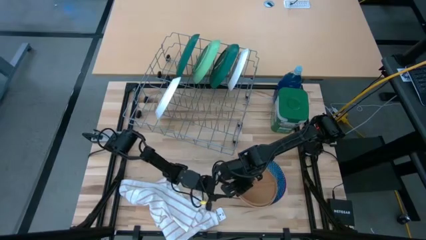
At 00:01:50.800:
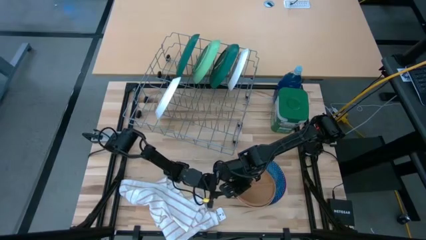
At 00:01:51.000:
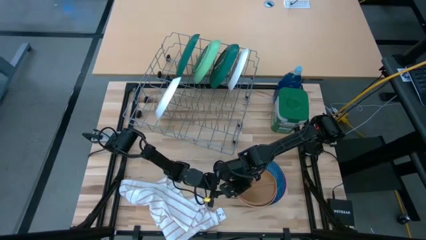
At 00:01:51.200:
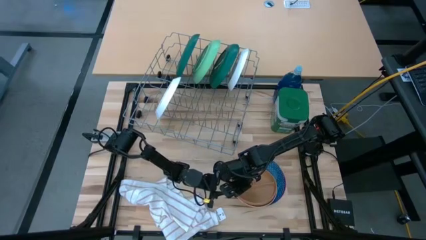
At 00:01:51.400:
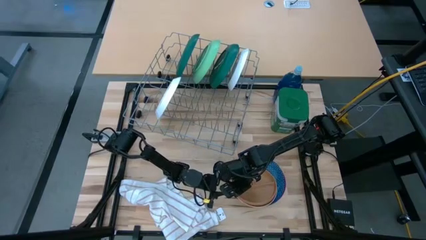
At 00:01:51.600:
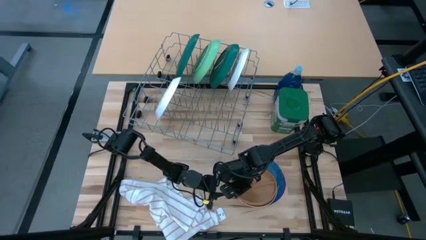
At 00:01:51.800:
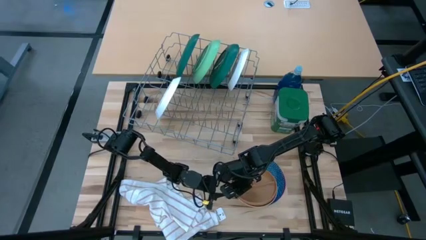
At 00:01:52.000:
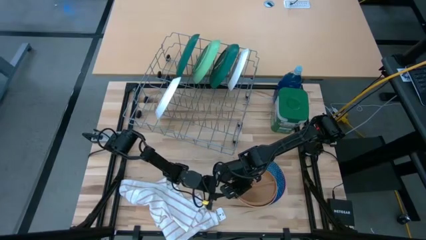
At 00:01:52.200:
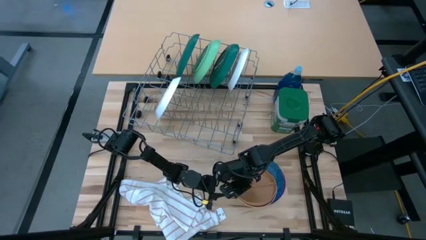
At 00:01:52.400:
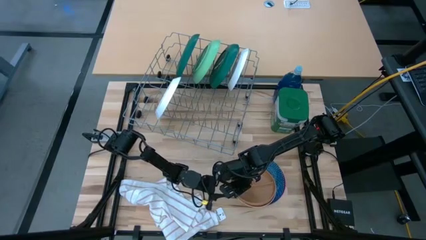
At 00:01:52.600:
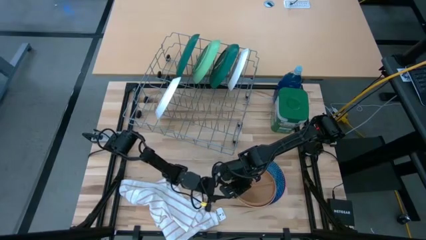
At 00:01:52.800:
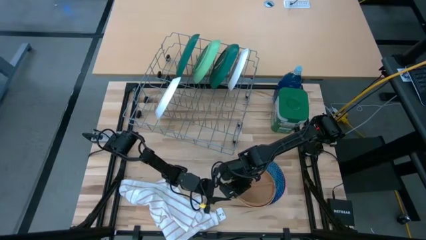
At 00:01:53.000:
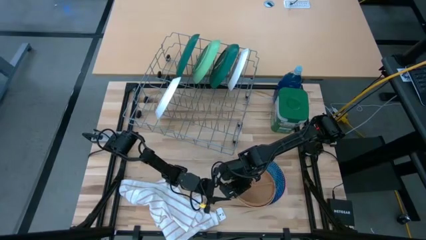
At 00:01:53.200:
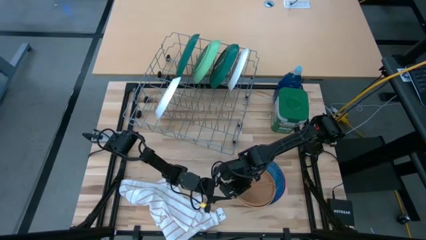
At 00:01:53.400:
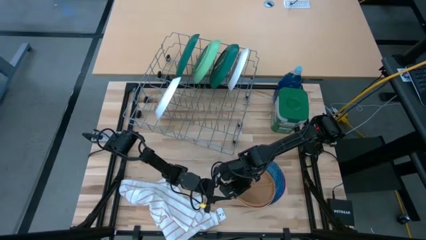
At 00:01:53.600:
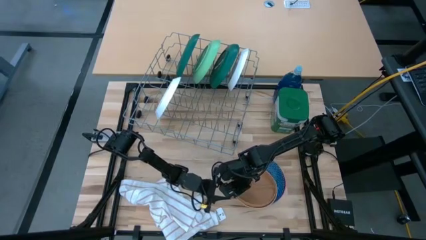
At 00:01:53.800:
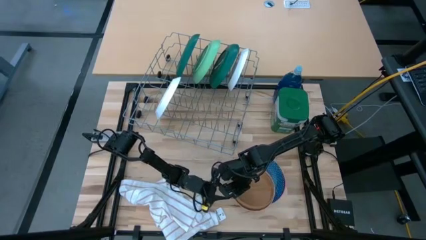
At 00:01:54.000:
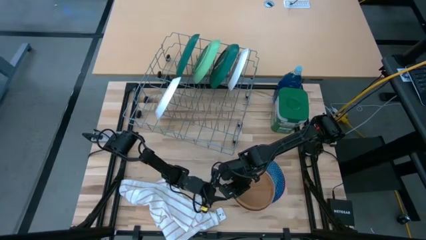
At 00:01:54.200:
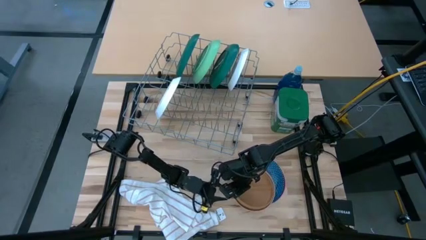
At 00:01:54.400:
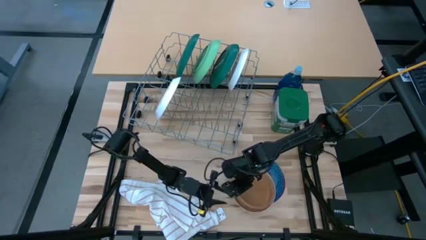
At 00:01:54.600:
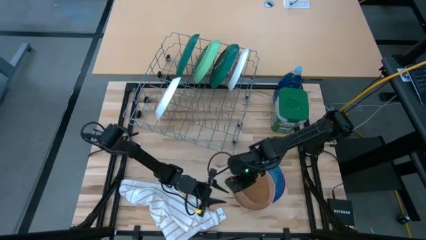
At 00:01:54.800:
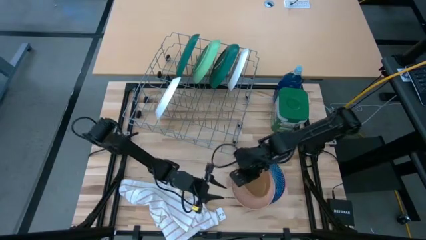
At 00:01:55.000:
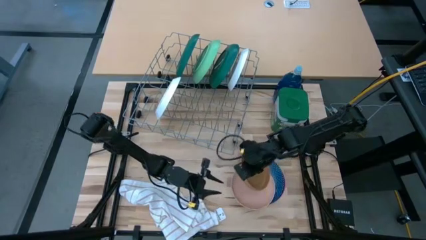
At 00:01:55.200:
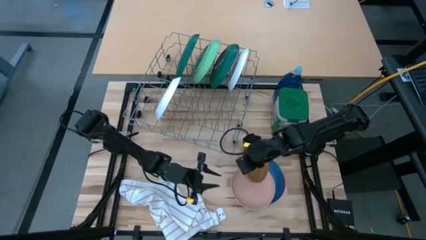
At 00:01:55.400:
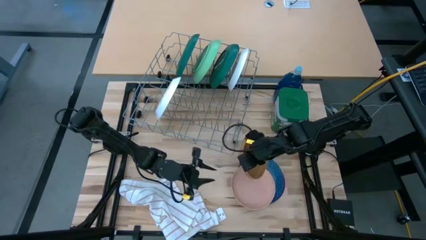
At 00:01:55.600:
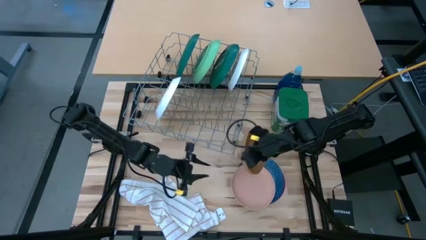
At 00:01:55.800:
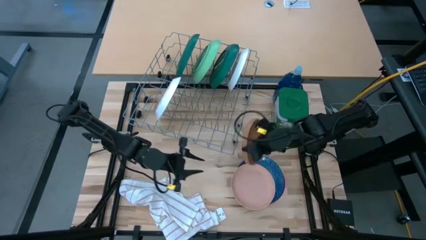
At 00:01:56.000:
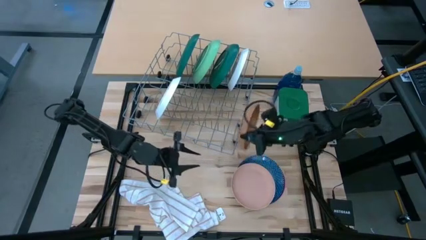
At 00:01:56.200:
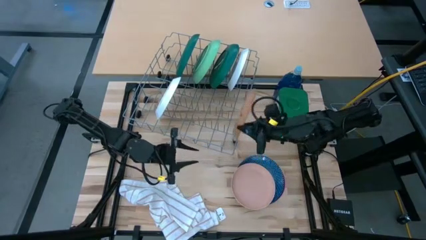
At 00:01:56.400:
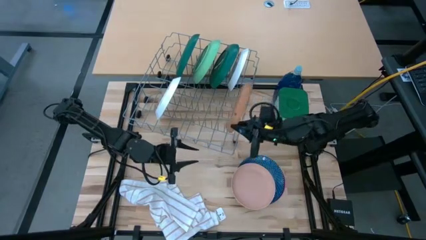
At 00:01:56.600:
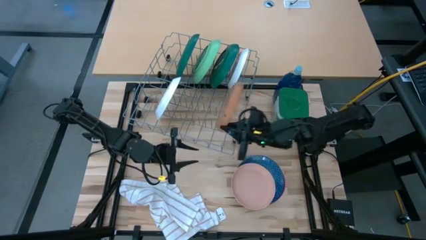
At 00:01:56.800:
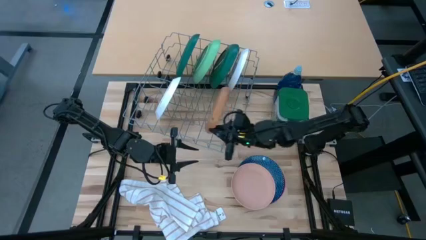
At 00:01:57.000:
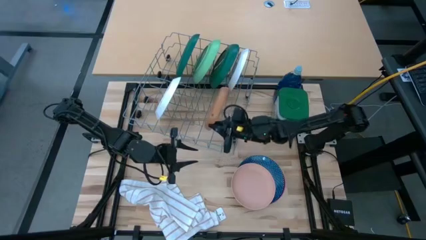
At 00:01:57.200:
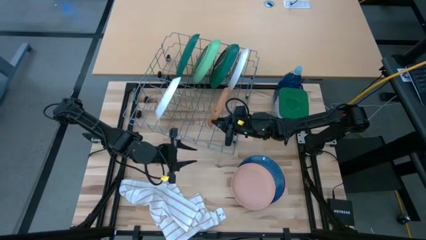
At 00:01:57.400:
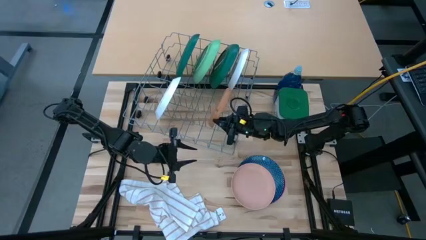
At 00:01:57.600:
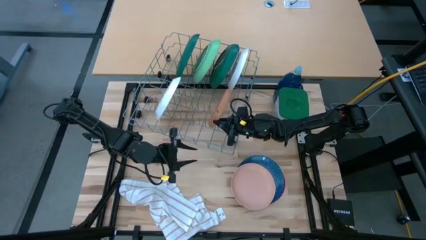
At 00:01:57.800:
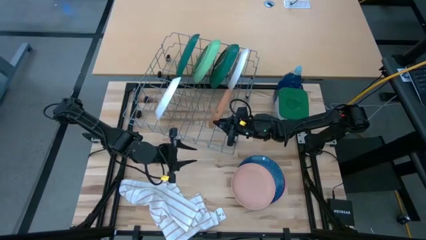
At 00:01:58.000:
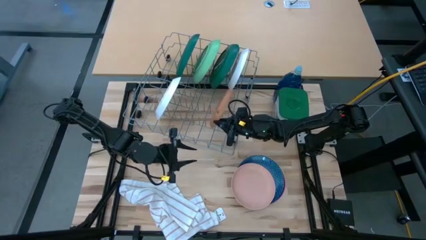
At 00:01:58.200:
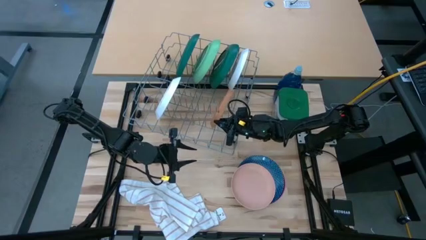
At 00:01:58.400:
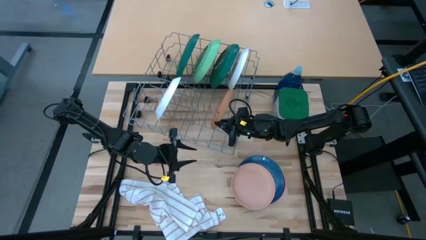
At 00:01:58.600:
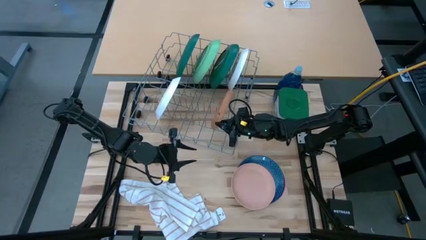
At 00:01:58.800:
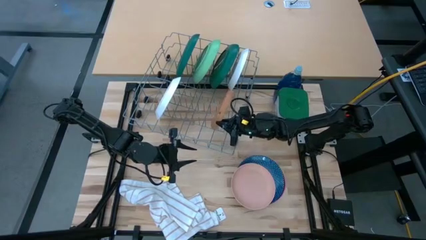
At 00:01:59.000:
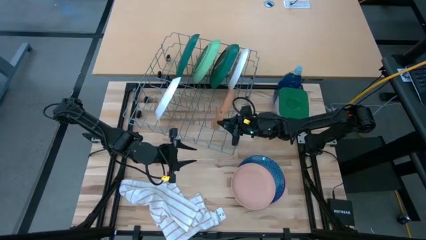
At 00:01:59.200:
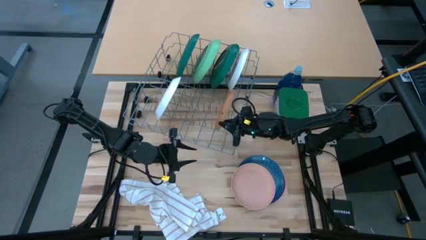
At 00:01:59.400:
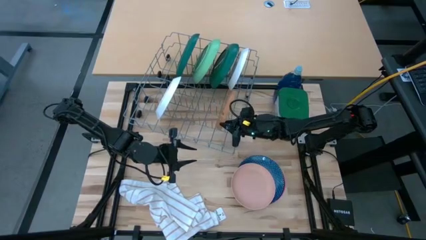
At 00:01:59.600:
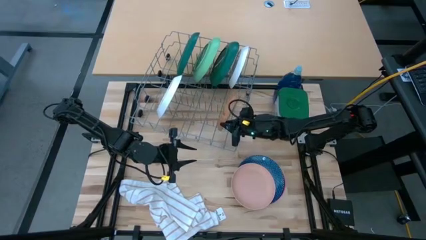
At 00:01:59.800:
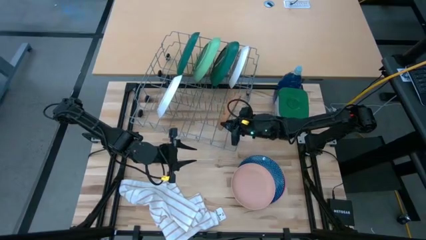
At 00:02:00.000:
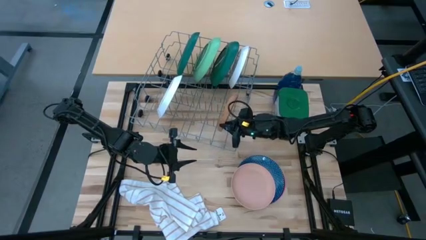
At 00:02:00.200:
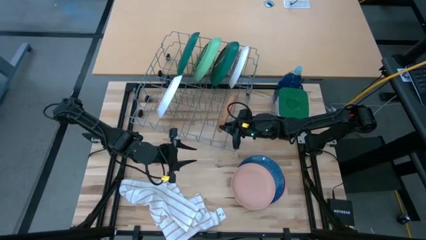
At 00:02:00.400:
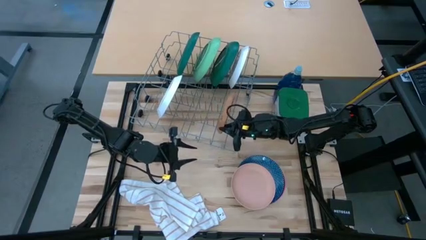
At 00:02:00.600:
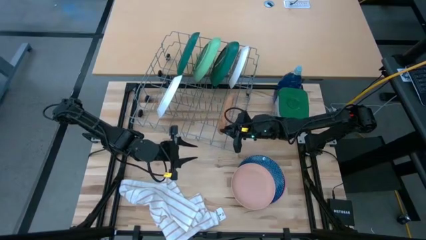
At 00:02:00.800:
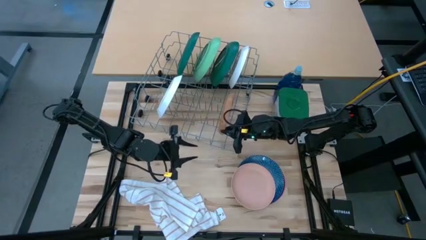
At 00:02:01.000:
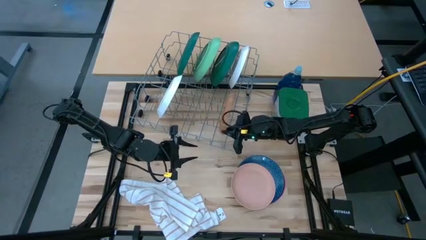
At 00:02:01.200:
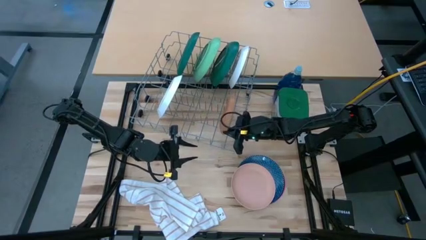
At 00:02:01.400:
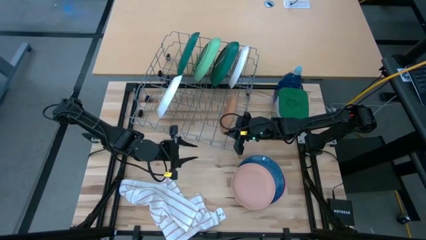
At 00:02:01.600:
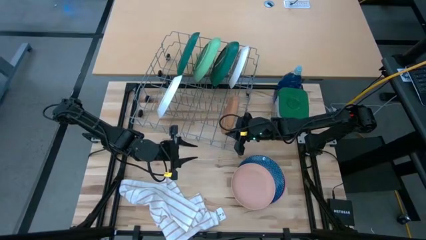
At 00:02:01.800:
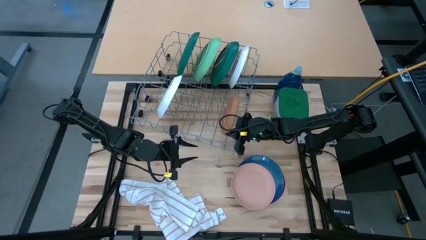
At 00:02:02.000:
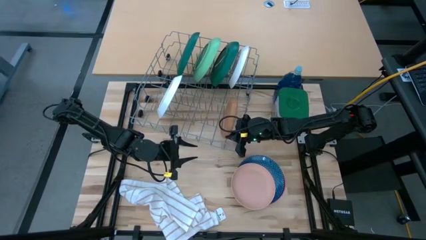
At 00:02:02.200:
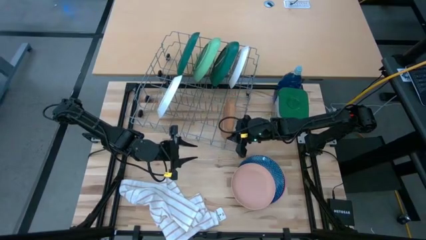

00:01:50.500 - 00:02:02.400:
Task: Sort dishes
Put the brown plate in the dish rack

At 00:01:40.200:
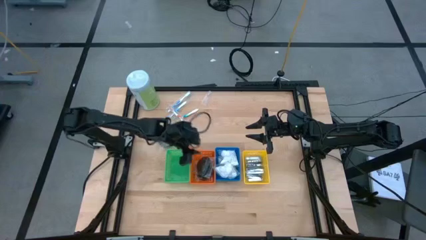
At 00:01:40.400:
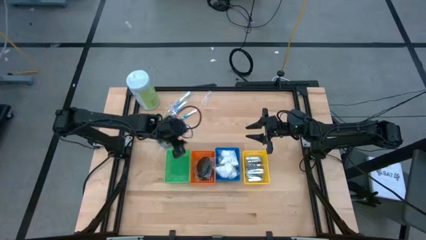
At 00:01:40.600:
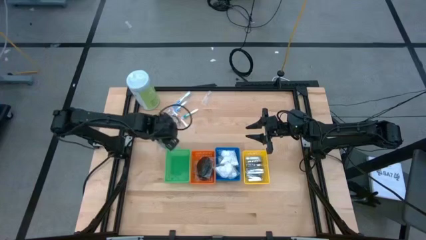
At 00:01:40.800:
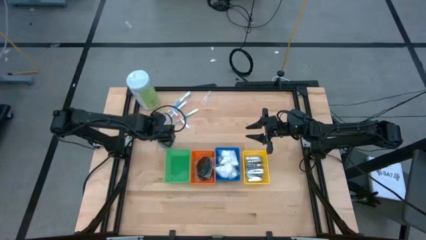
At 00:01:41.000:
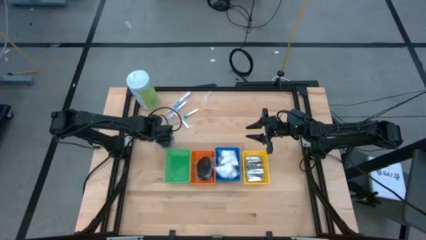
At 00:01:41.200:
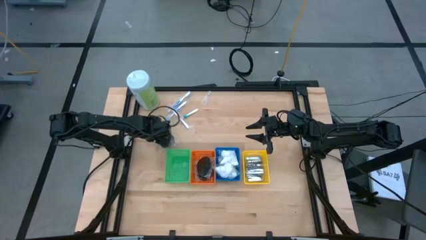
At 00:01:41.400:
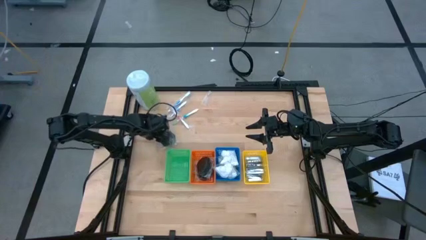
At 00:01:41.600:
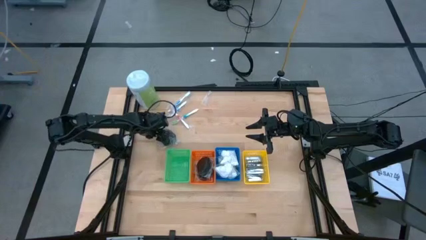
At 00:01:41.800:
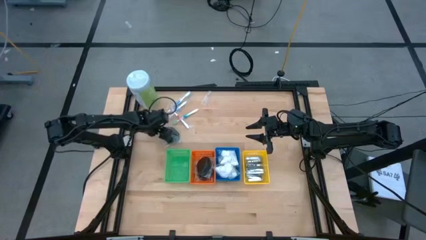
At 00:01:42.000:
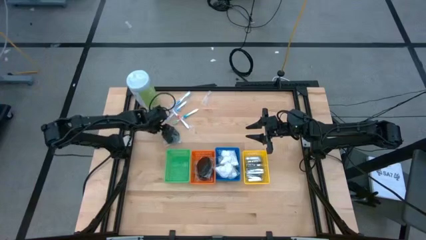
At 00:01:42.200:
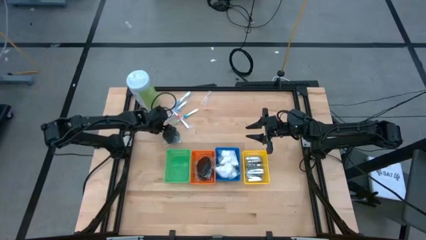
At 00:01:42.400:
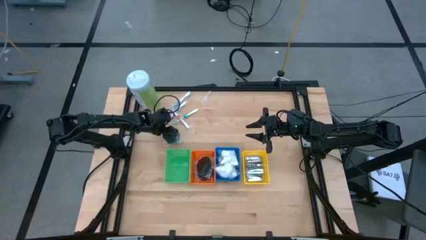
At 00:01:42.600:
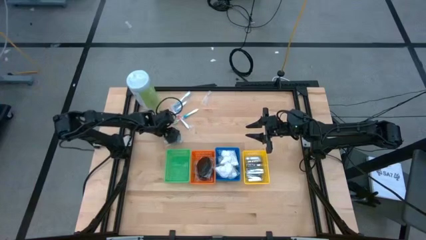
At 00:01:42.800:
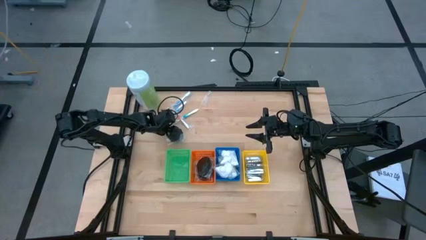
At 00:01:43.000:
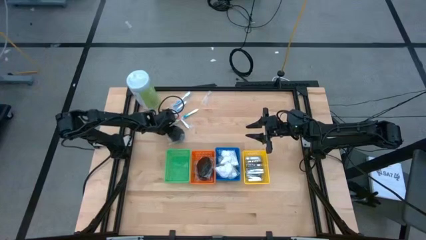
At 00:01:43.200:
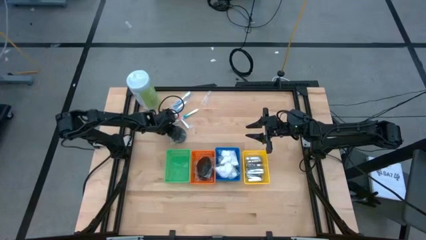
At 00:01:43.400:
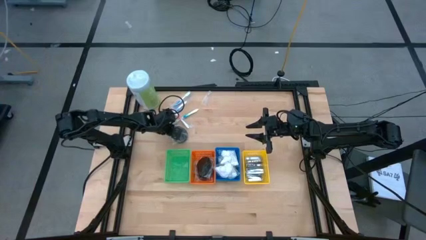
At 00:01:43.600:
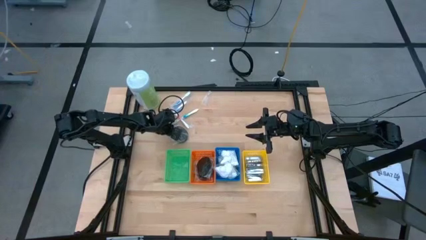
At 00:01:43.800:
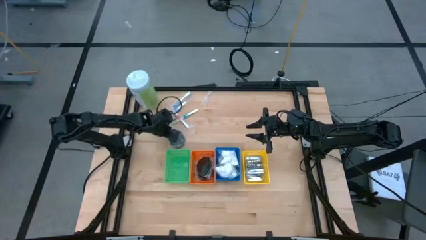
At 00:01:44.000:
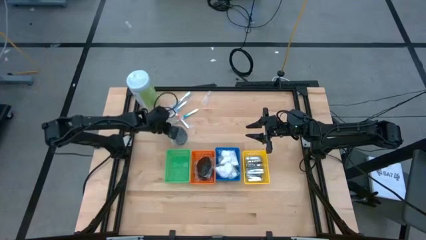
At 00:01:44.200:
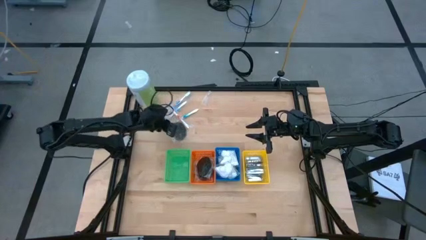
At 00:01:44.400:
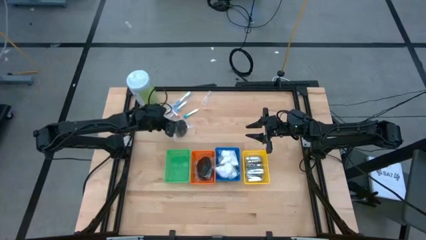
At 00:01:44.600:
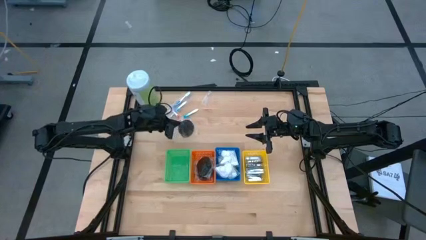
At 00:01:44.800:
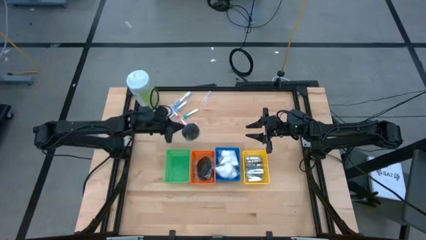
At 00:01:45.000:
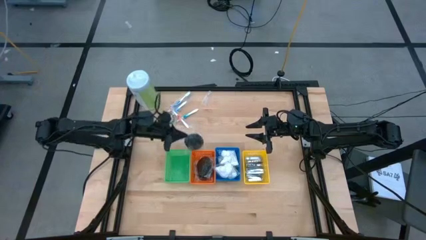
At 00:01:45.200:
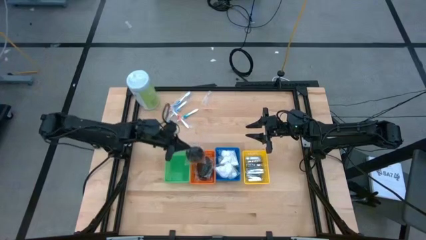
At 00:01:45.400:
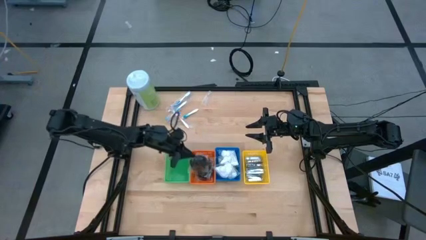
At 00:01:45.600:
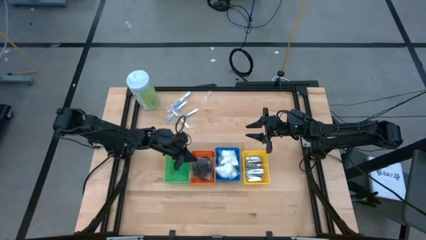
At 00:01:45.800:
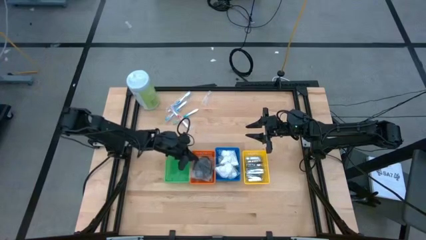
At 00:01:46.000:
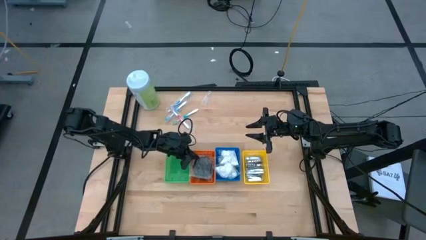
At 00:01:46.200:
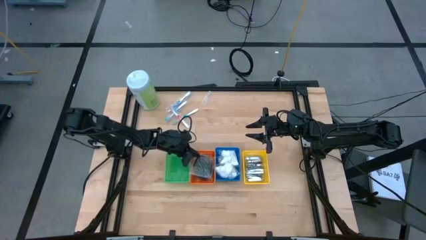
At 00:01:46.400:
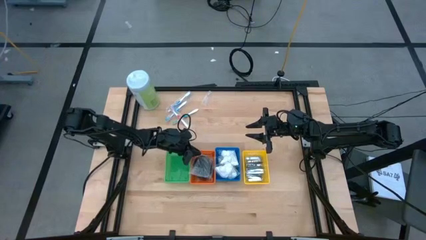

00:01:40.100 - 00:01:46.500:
Task: Pick & Place Travel size toiletries
Put the black mirror into the orange basket
